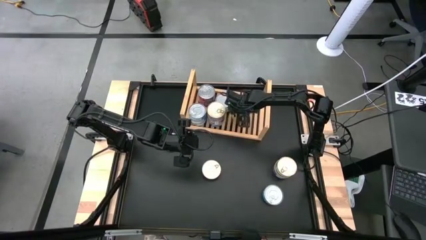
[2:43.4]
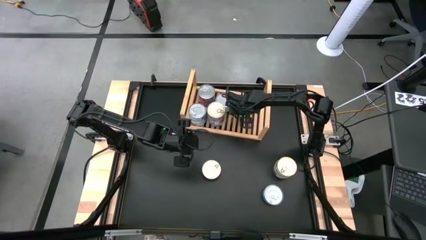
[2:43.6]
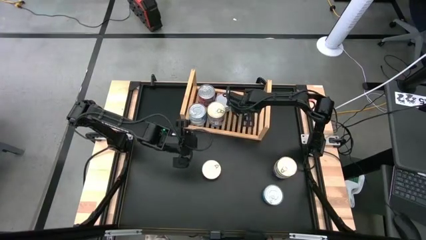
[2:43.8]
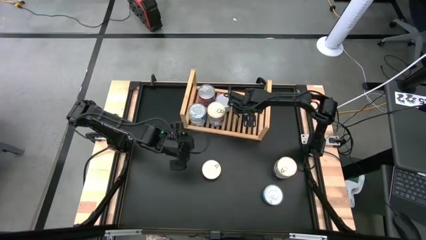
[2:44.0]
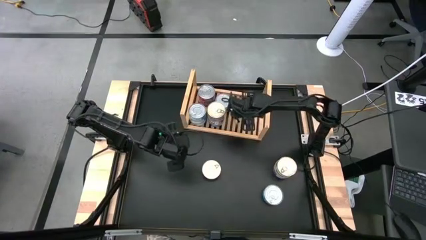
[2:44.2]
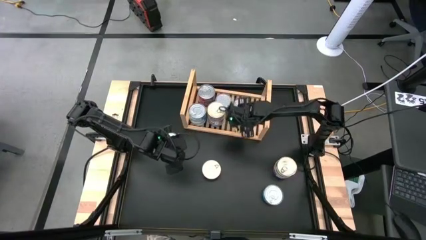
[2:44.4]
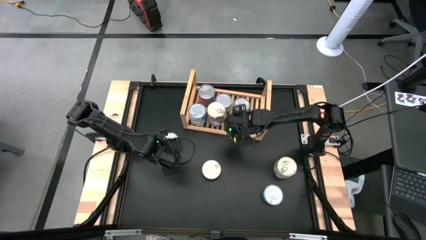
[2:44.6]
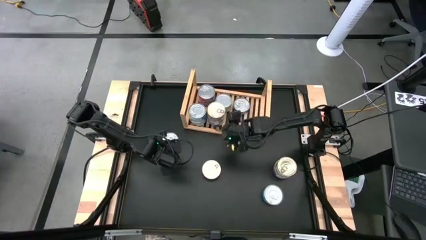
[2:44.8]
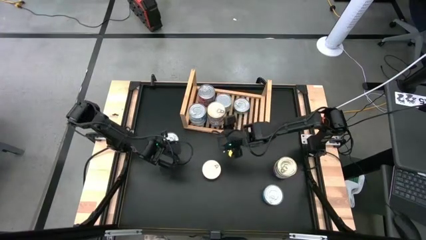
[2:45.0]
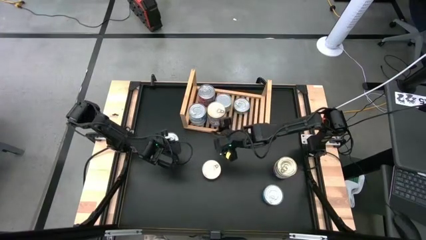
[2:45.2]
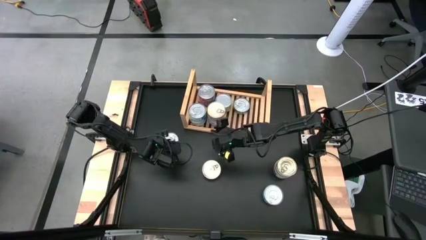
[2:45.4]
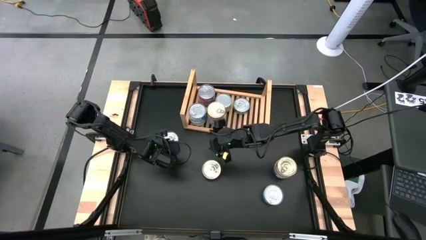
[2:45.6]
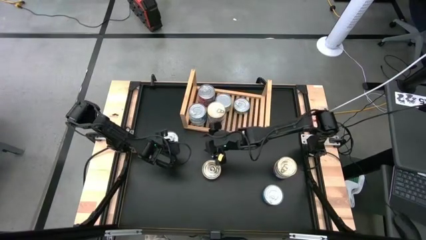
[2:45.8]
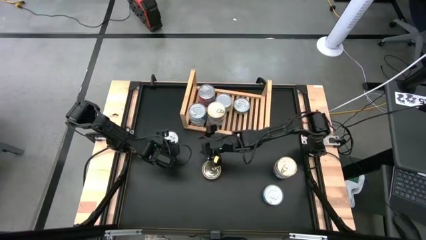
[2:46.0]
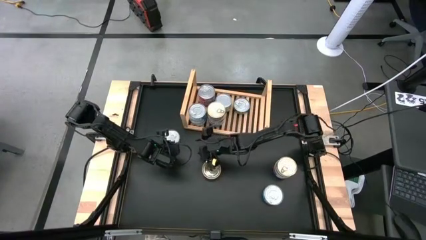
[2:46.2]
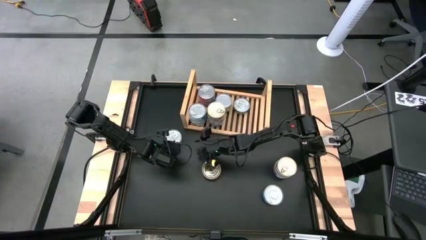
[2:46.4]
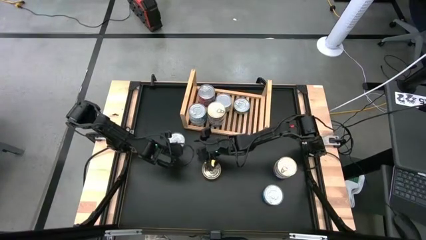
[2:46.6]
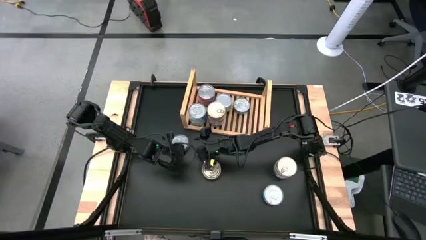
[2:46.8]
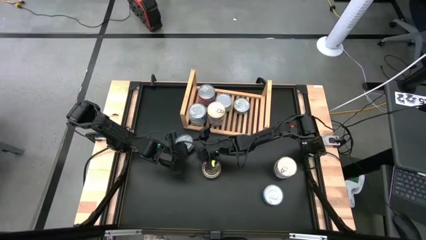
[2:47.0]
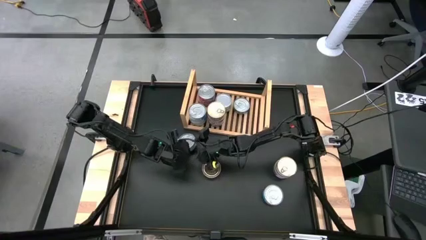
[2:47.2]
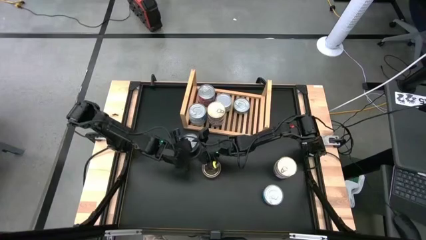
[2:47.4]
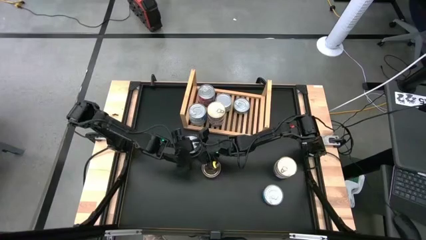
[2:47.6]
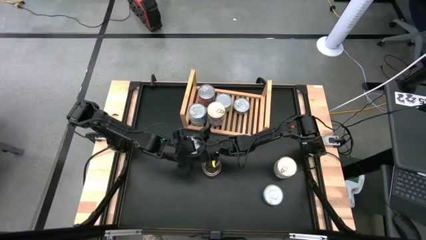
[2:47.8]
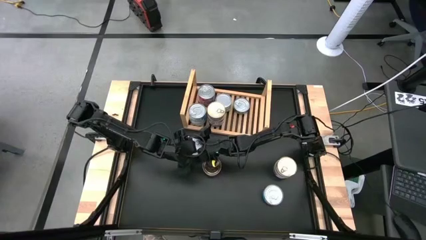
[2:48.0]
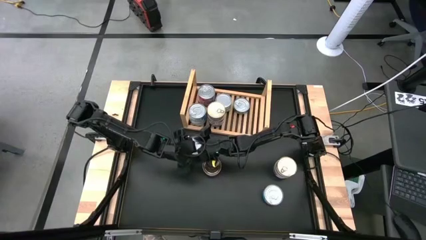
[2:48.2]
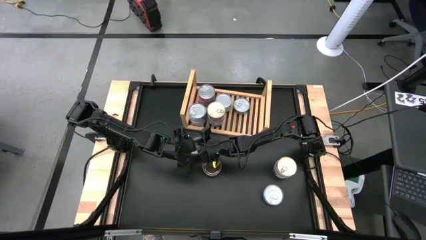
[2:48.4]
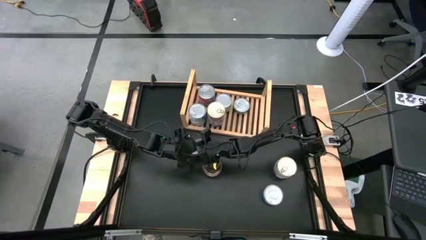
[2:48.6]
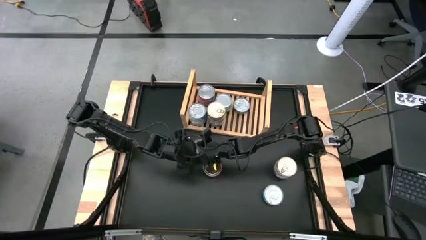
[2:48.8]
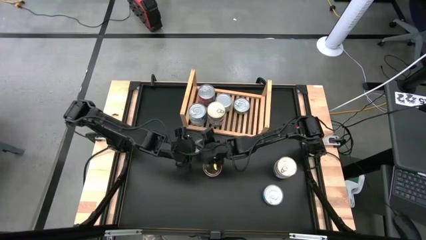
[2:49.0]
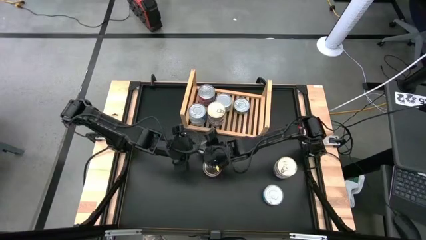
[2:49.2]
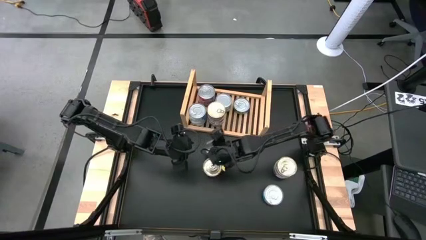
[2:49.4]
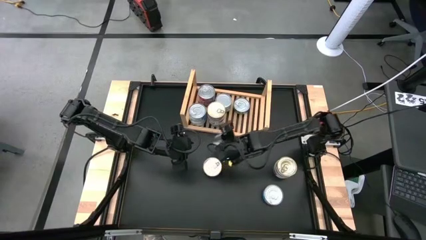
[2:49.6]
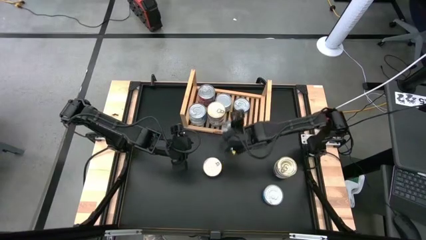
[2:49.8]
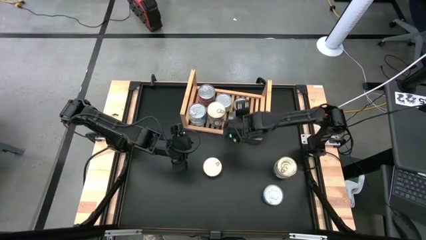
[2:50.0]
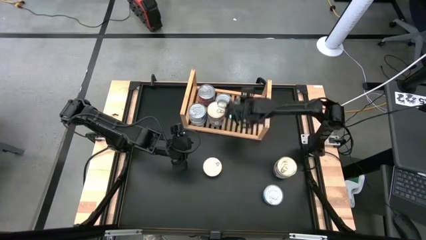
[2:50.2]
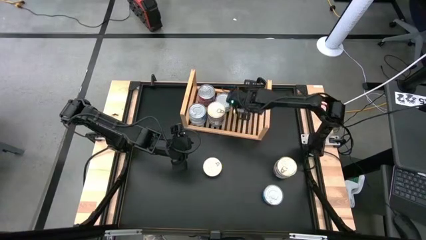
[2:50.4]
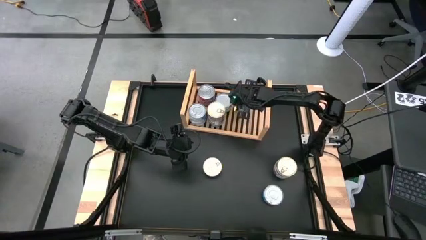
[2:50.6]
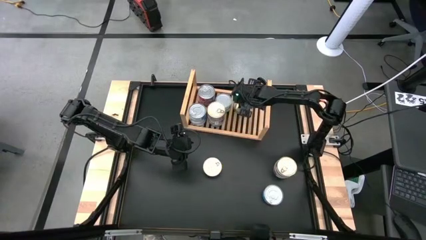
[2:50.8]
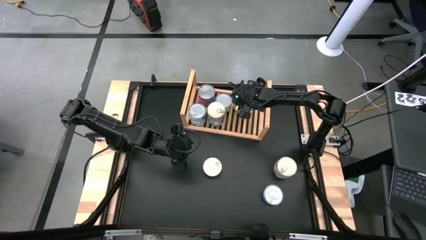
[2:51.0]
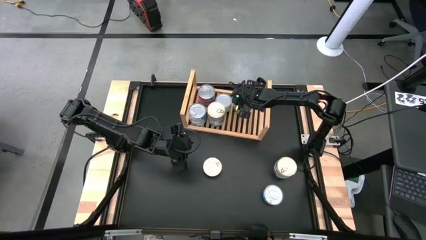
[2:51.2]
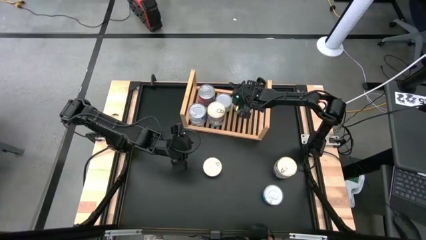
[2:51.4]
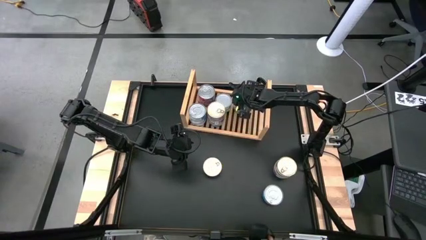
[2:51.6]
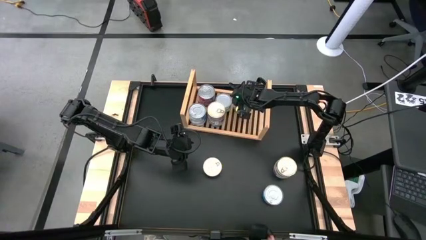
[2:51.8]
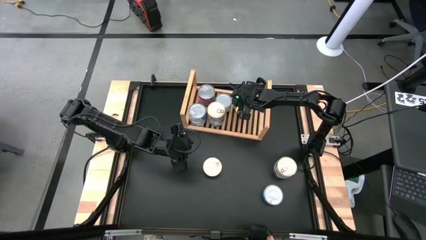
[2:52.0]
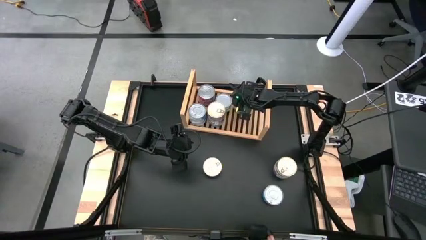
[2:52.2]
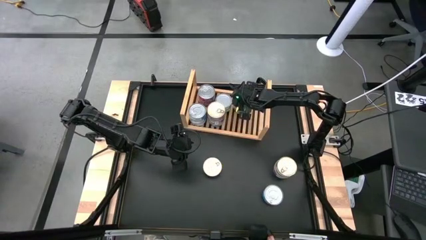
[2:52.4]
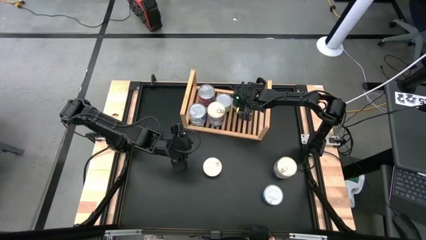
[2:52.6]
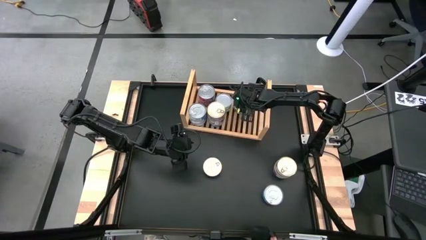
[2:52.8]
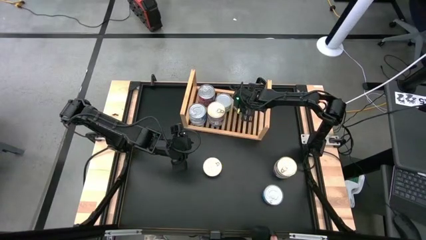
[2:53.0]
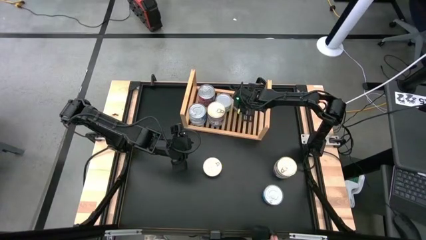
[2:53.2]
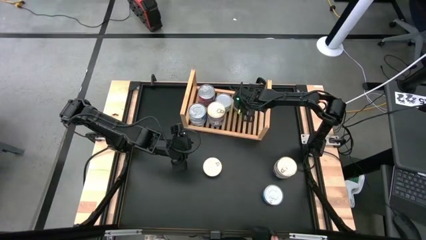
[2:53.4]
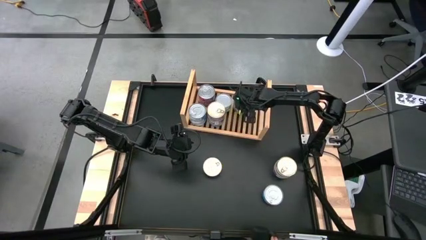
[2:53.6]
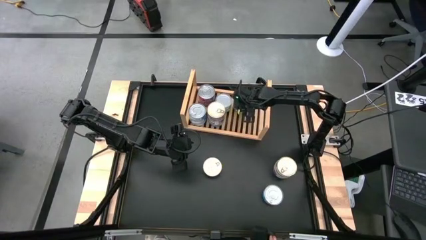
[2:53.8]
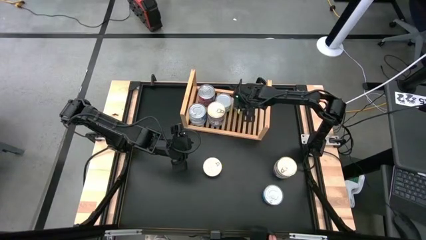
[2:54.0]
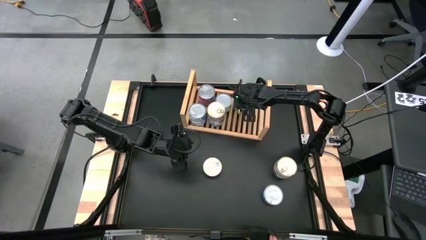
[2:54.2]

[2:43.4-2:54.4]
Task: Stack canned seafood by type on shelf
Stack the green tuna can on top of the other green tuna can on the shelf

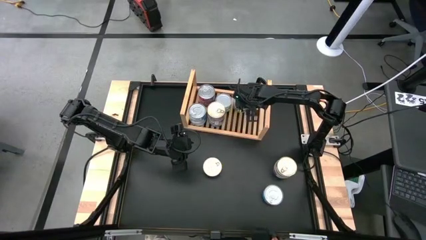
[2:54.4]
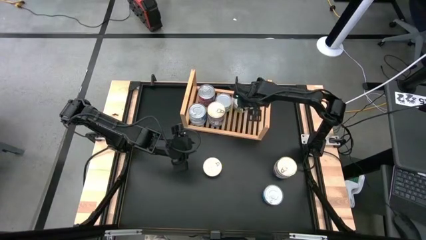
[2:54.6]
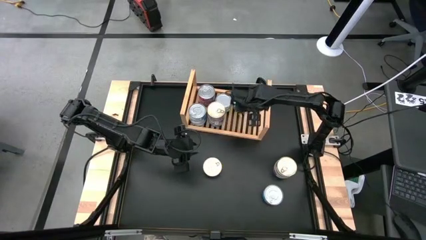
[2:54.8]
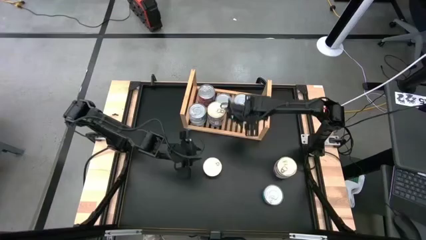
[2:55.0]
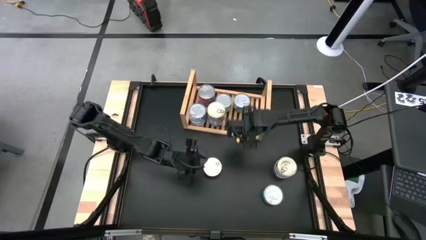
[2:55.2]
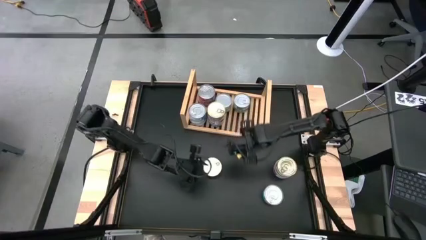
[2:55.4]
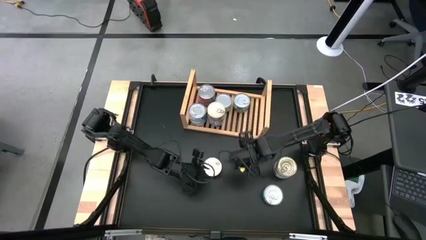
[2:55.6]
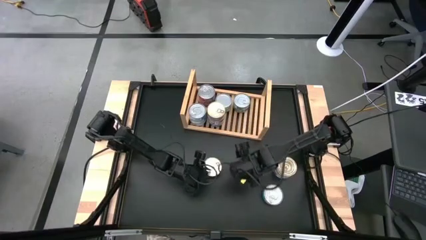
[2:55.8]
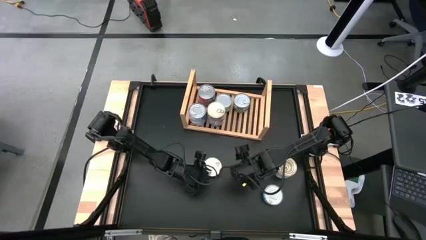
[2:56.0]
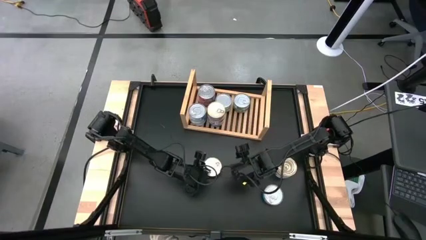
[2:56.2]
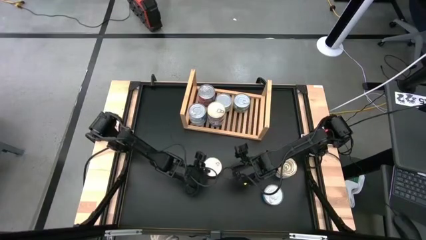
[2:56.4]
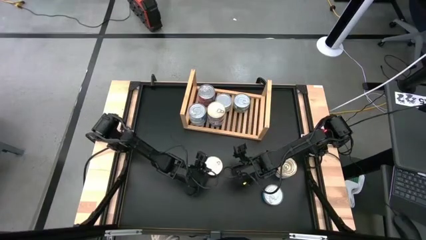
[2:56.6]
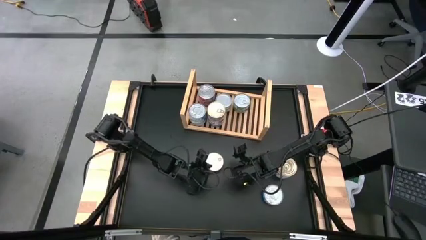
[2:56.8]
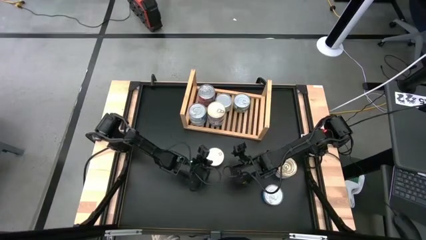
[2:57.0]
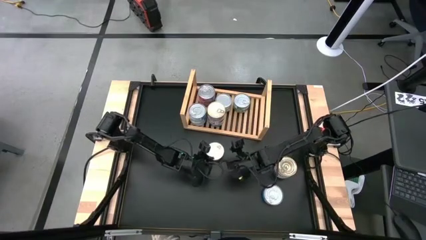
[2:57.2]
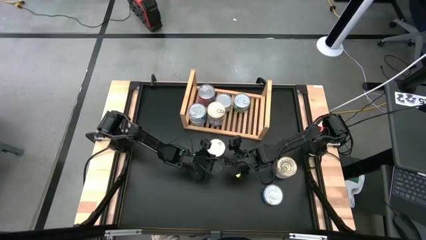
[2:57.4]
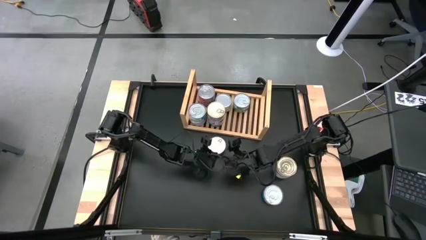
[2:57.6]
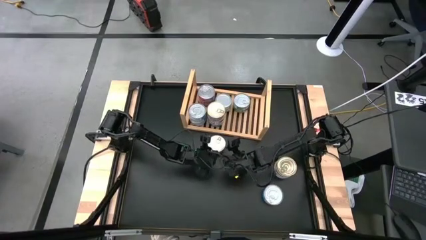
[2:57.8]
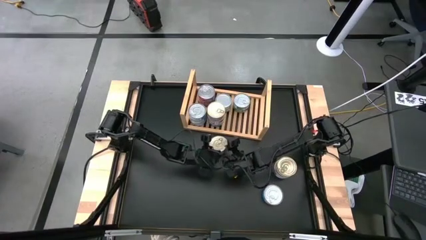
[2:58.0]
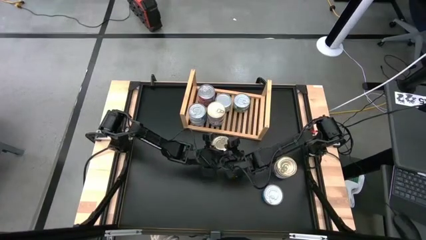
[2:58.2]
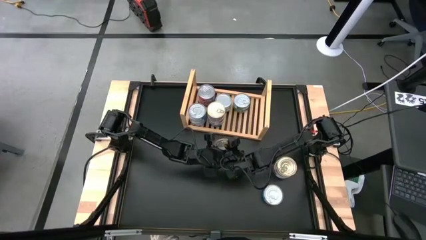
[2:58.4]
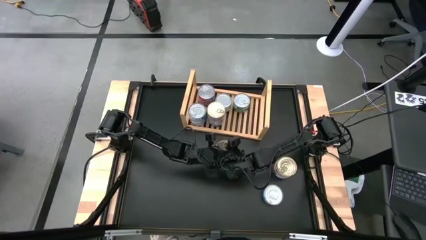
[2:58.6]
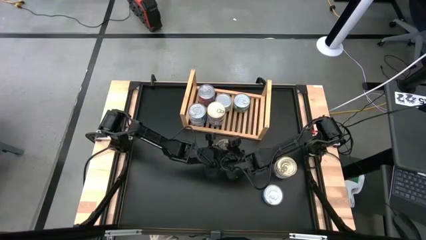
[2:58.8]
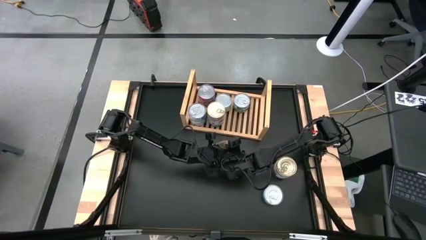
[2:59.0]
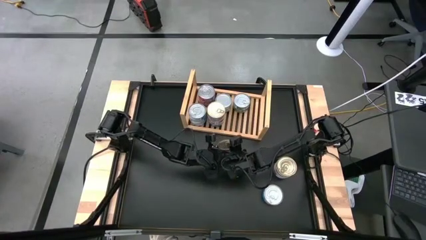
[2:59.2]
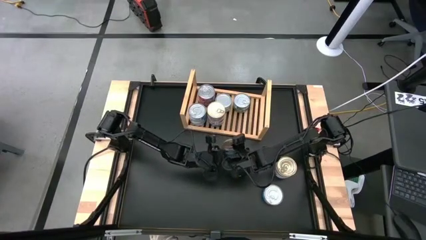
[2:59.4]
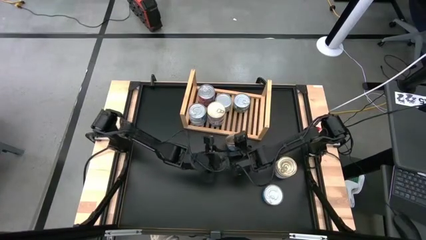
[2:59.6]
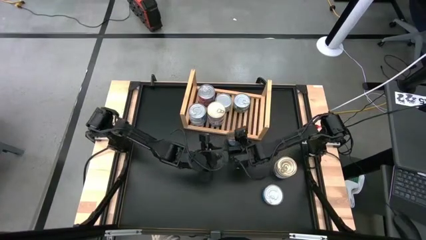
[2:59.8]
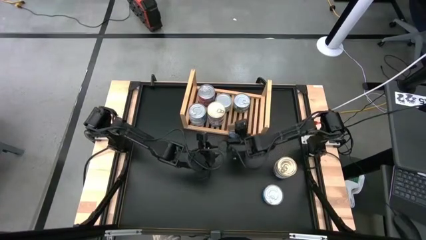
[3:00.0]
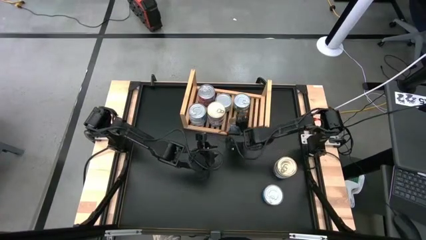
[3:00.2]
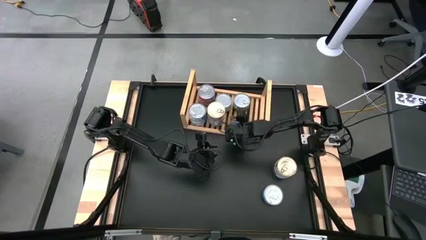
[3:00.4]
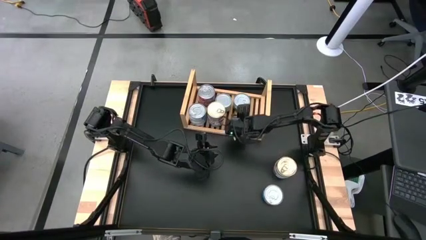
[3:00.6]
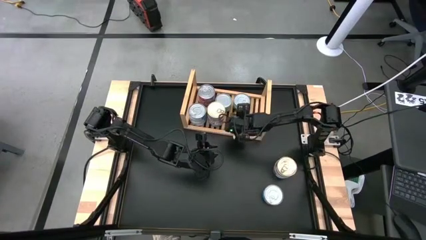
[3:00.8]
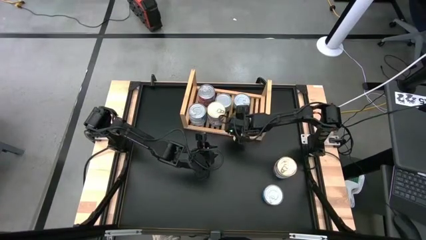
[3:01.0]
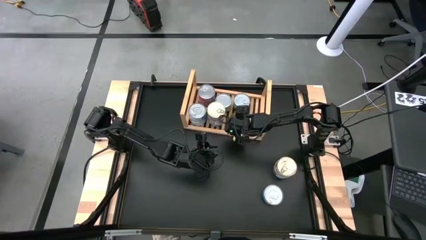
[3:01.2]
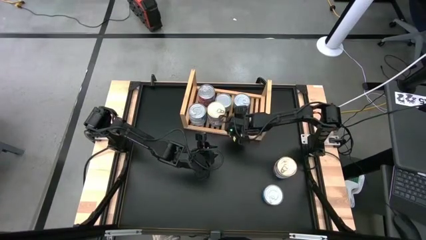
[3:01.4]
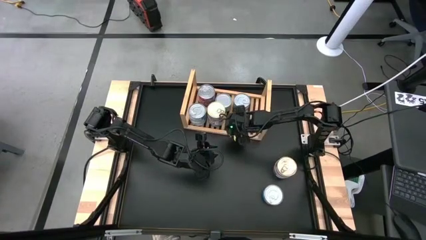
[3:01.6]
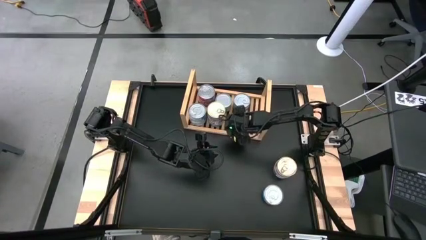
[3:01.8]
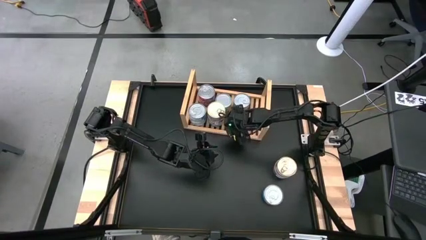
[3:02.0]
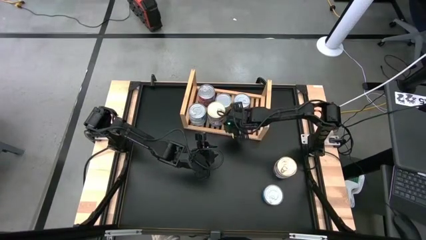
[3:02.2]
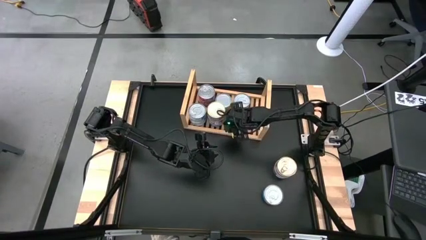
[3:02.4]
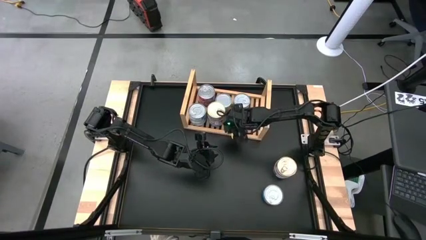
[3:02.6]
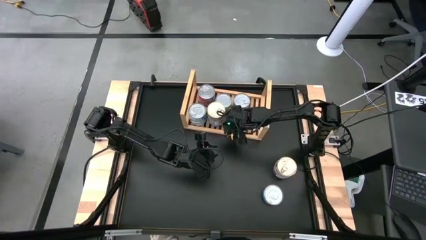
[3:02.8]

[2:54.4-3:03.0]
Put the blue tuna can on the shelf
